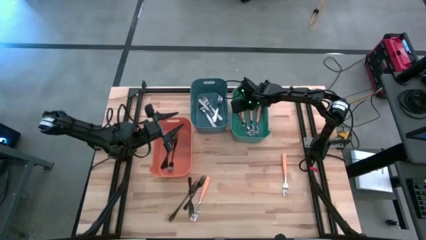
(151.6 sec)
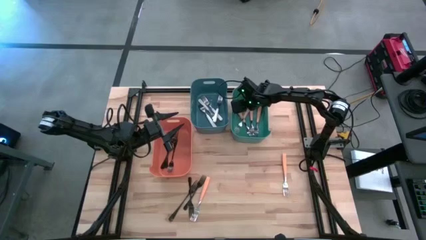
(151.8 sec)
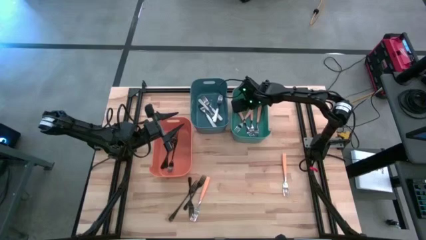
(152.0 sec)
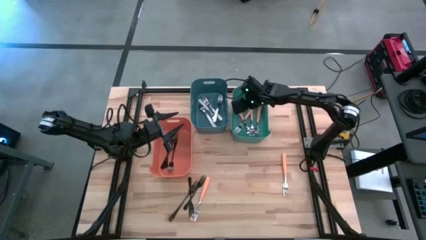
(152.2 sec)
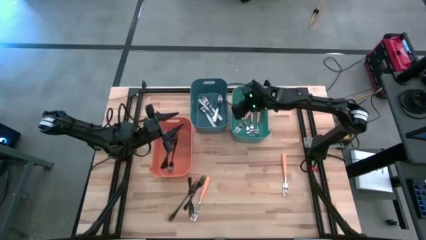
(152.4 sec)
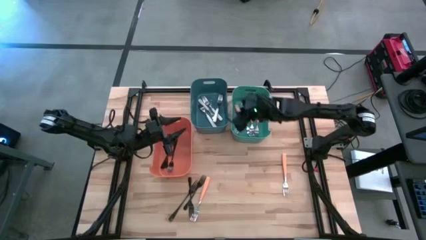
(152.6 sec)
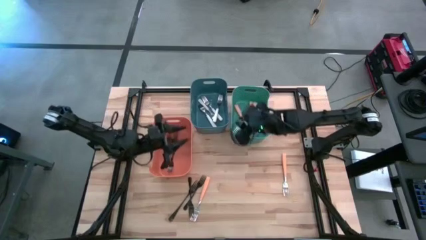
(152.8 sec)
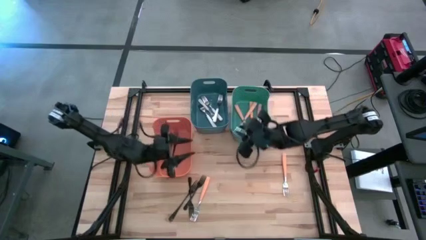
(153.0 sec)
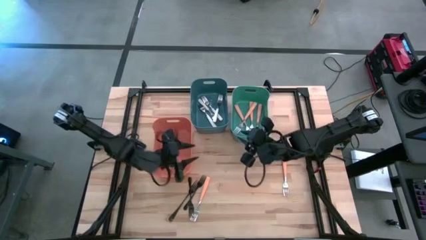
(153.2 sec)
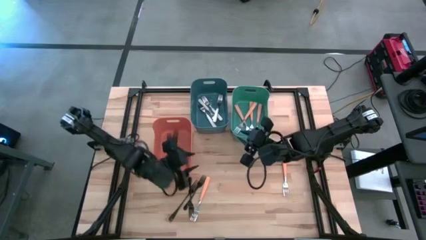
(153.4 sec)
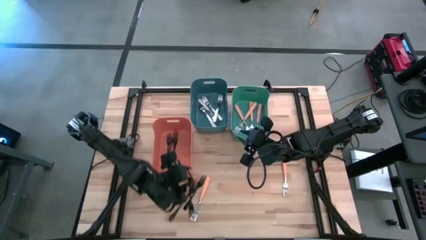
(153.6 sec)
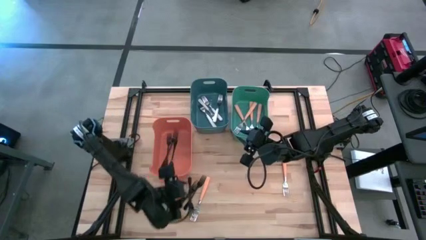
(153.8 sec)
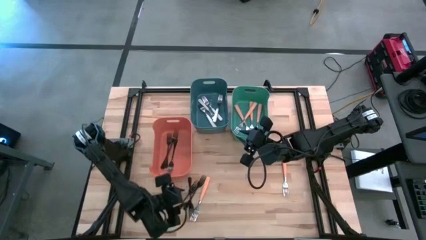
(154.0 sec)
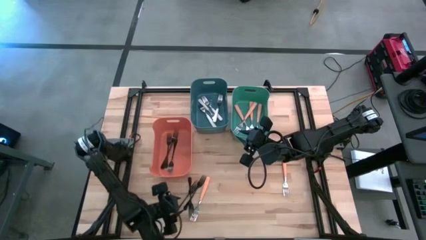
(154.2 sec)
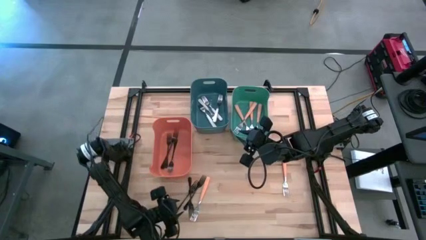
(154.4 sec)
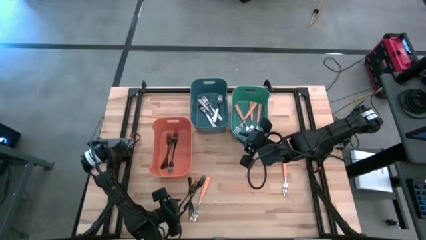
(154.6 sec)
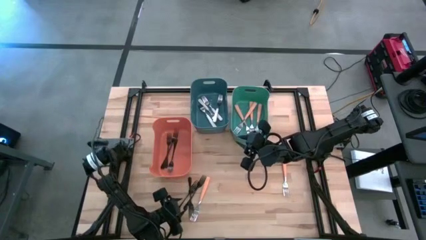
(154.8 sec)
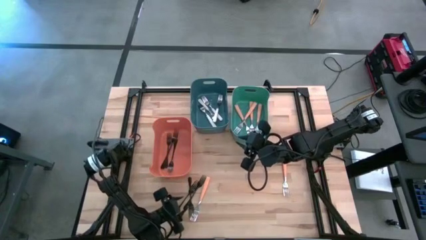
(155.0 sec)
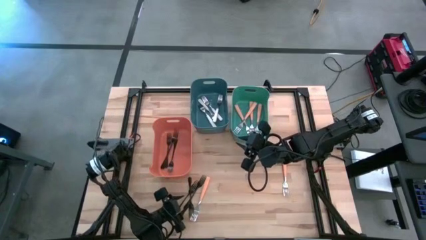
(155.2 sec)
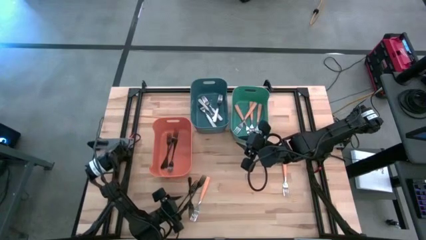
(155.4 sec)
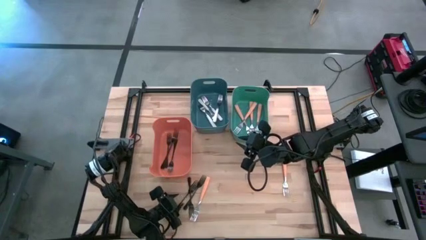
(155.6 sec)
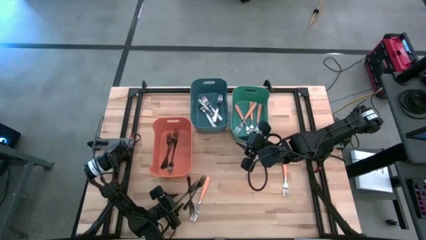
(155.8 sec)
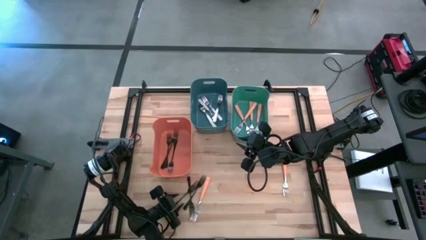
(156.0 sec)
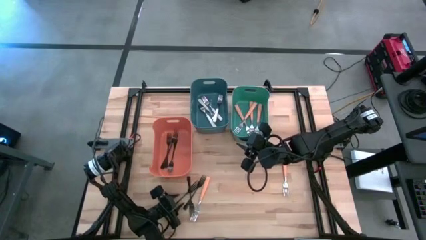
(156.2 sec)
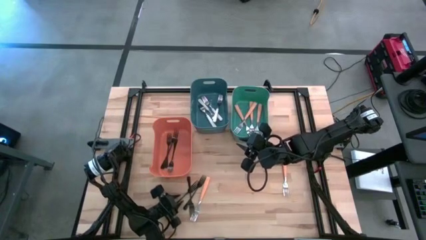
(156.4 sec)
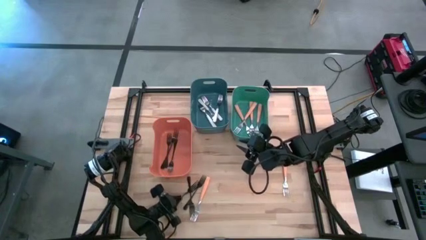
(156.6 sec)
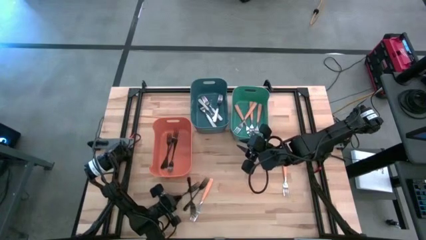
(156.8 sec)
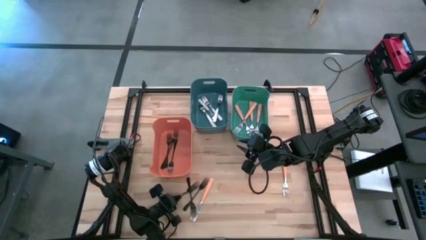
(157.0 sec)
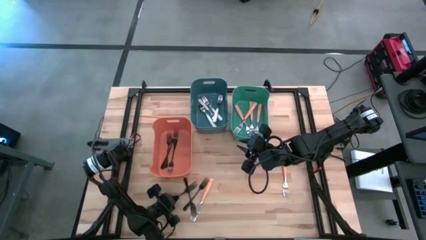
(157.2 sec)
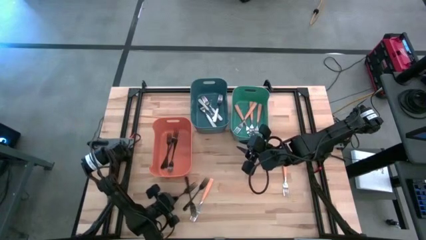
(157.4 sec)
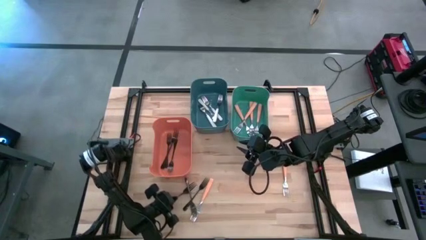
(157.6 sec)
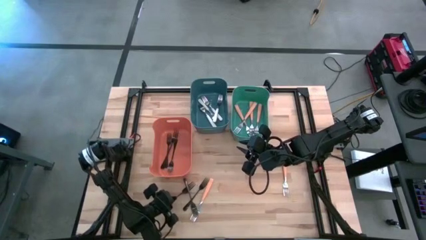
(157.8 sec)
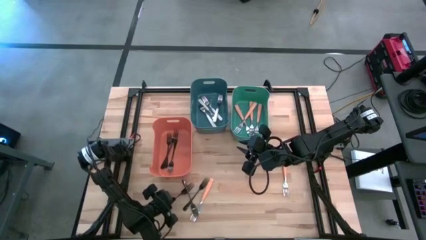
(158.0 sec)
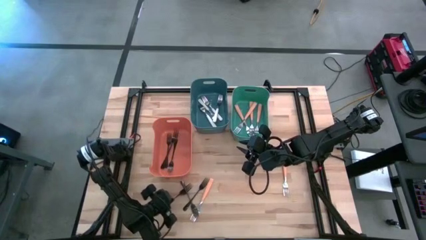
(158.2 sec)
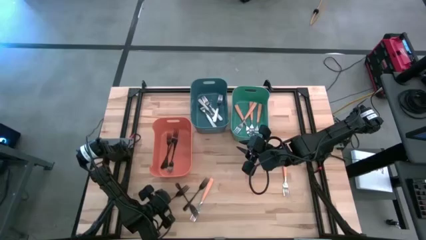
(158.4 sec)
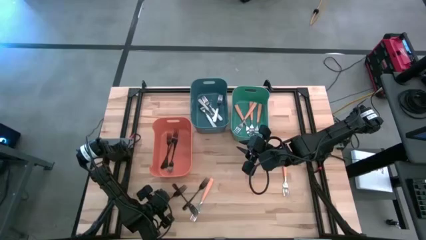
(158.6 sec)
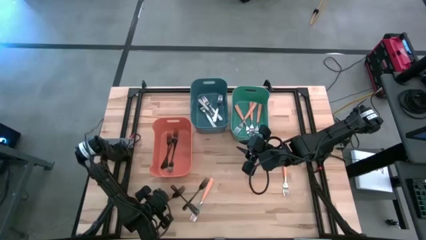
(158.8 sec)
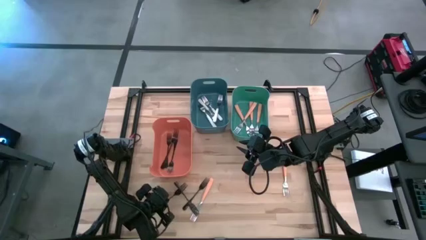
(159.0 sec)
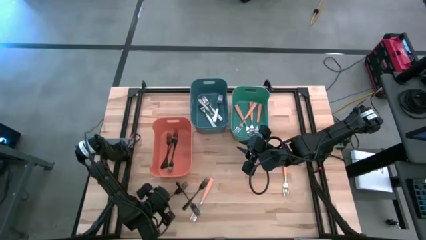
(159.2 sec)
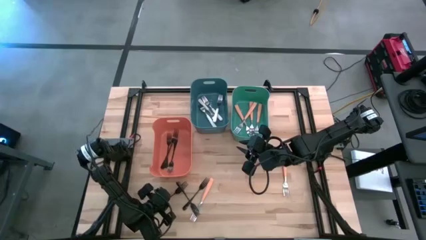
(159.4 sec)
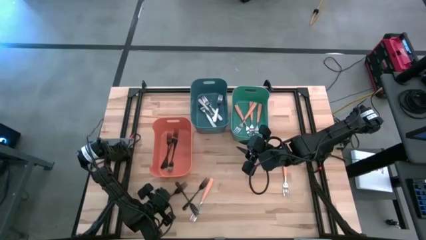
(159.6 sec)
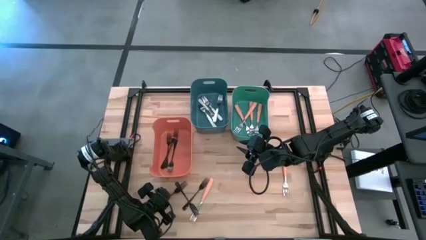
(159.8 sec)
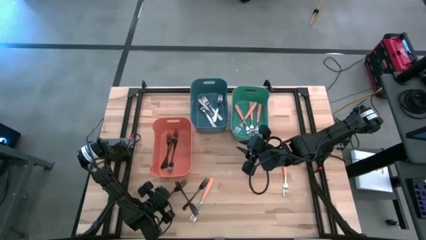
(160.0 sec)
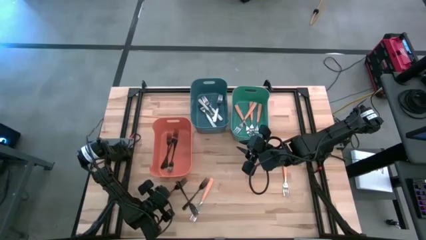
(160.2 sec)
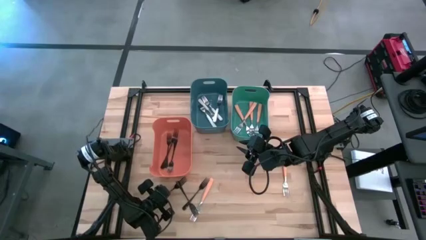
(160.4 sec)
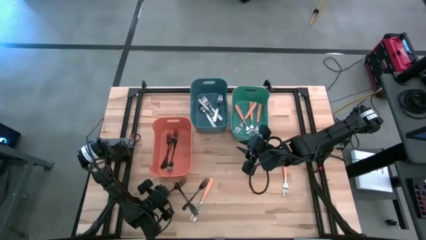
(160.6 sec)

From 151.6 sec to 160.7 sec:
Task: Sort silverware by color (type)
Put the black fork into the orange bin

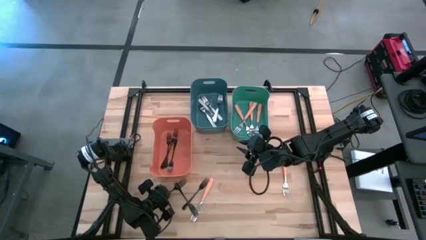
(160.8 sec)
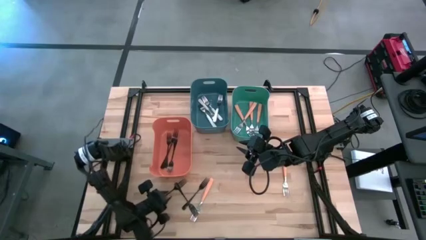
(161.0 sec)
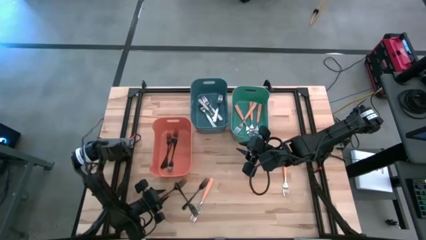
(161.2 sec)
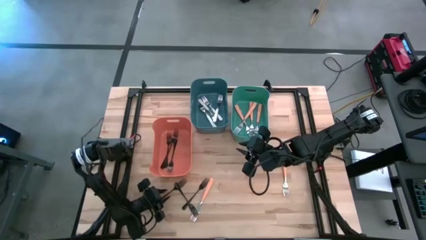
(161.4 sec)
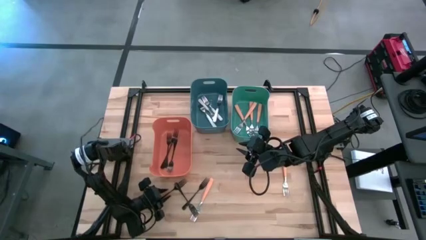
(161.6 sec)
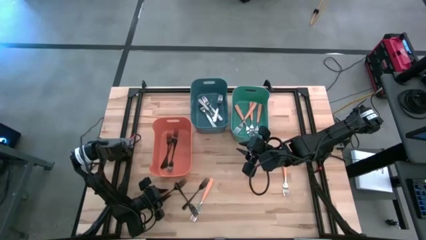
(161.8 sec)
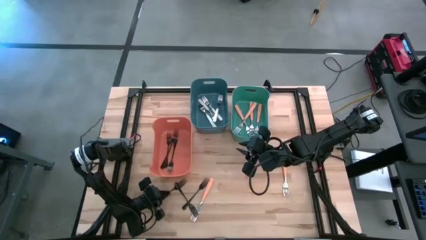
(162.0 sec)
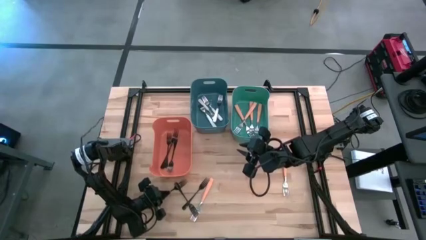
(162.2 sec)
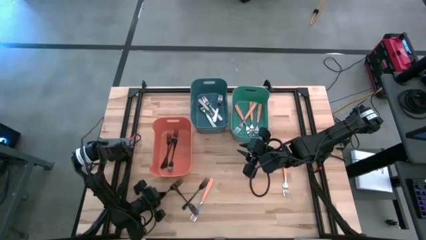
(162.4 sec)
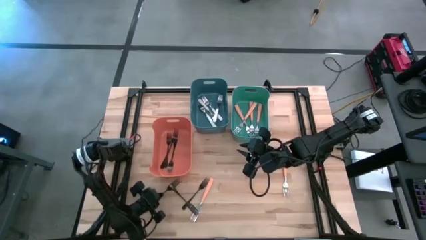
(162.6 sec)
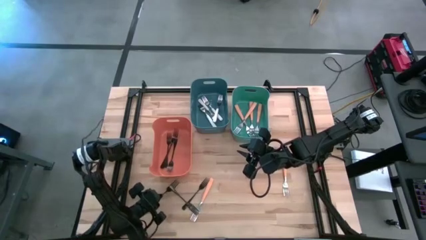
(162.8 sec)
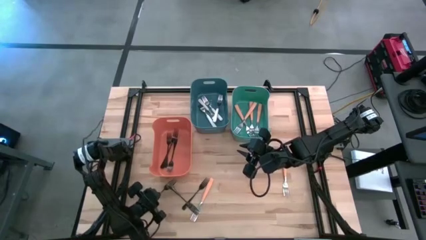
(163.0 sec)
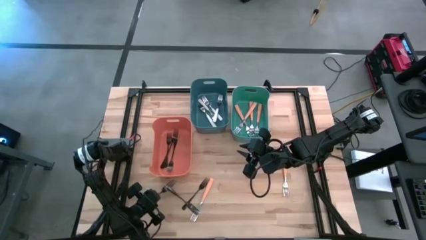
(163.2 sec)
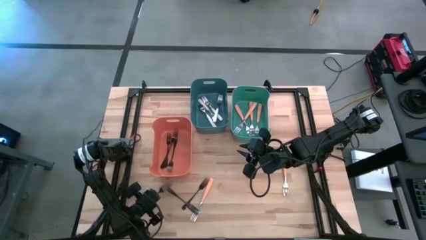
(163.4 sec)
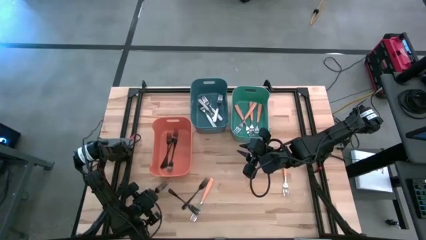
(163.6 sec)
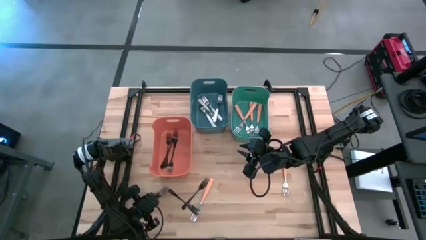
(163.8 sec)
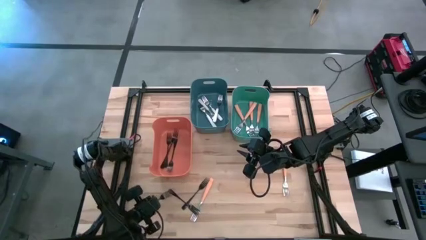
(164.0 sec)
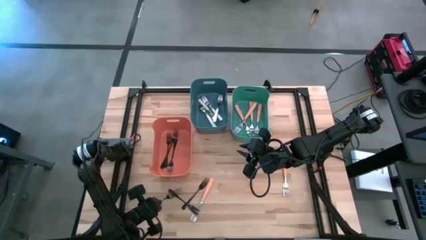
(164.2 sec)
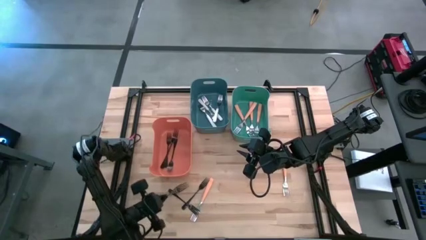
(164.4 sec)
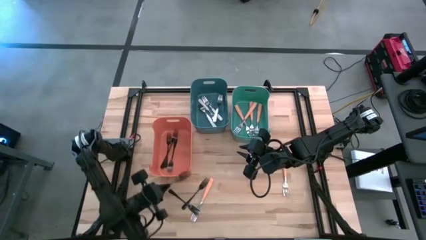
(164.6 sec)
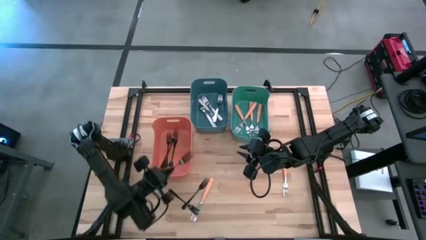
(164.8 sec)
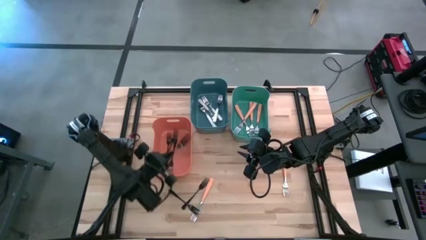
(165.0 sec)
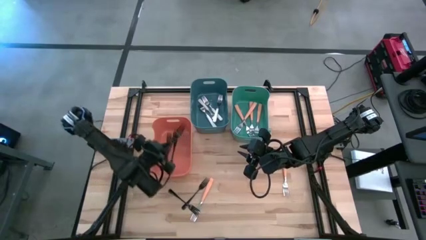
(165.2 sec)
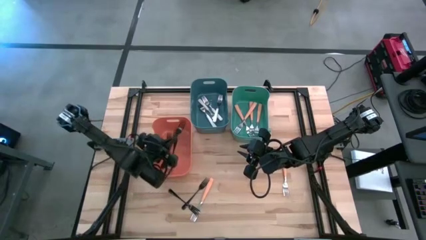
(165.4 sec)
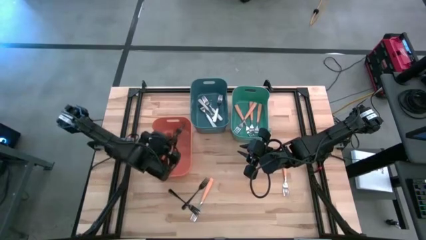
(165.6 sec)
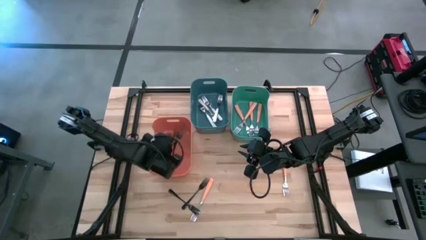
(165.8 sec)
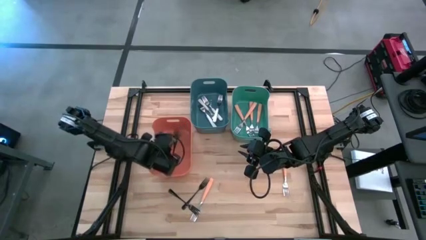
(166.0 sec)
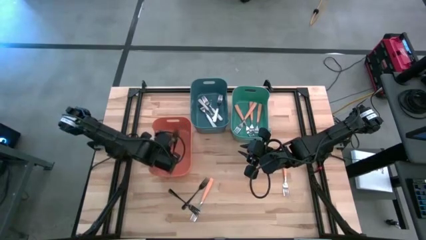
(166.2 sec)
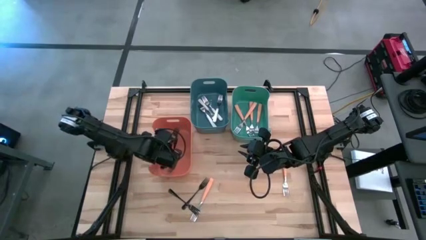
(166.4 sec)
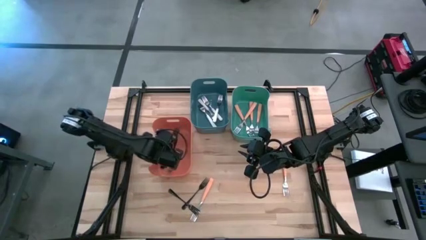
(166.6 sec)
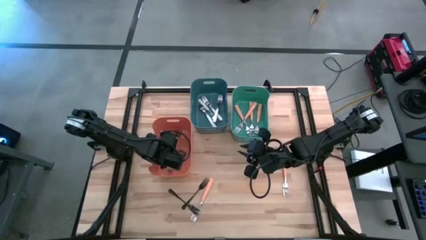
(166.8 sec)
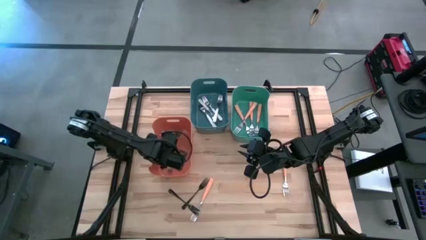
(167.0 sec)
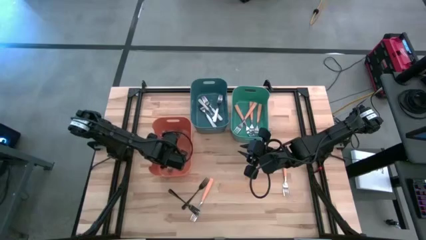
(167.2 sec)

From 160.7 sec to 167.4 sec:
Put the black fork into the orange bin
